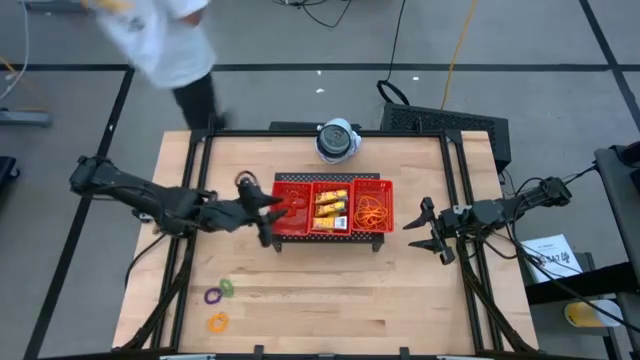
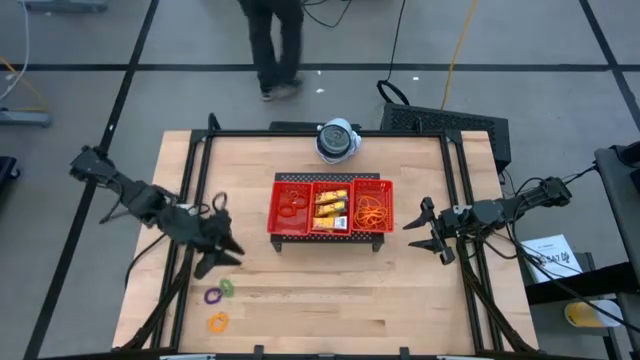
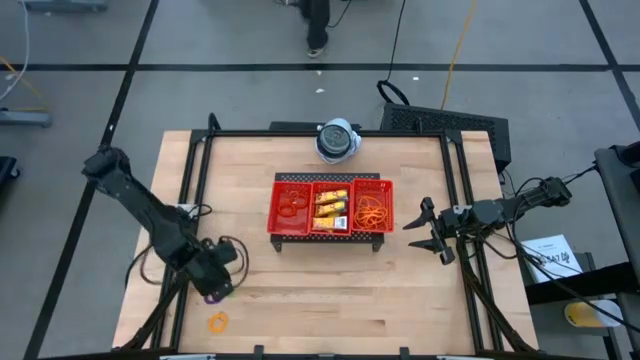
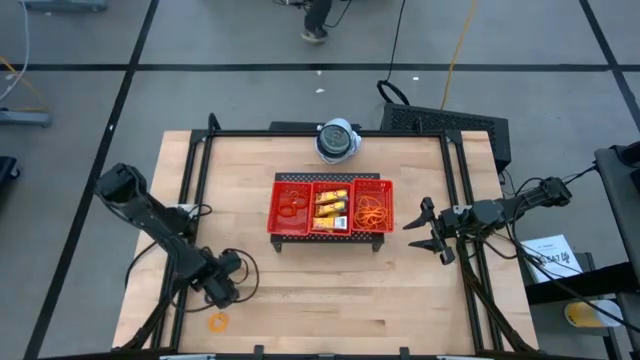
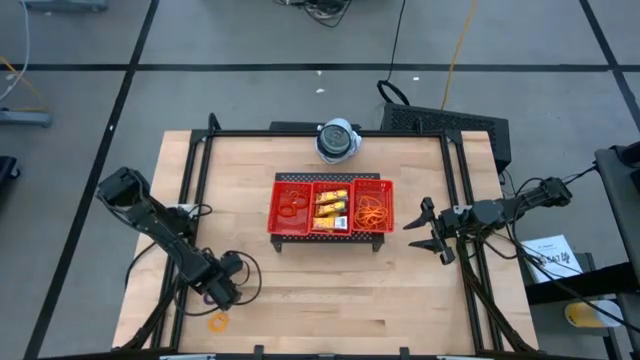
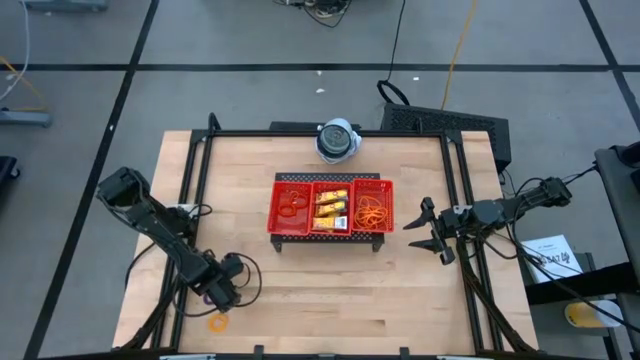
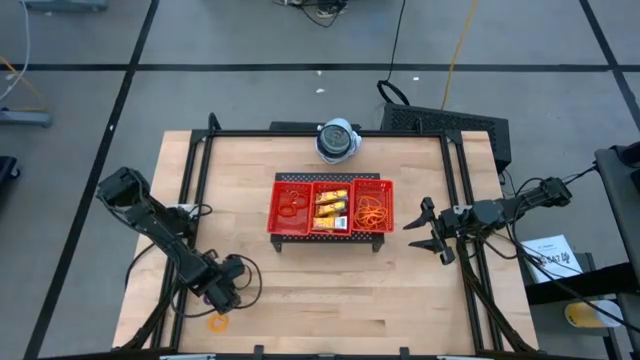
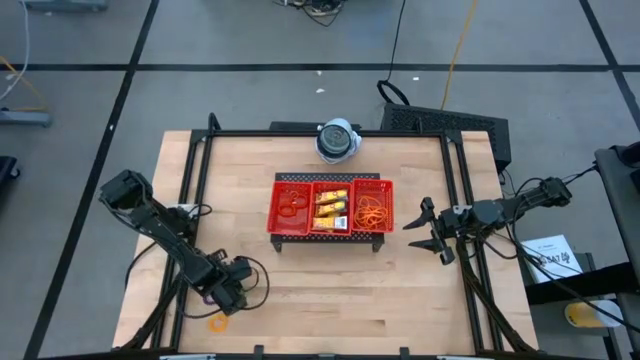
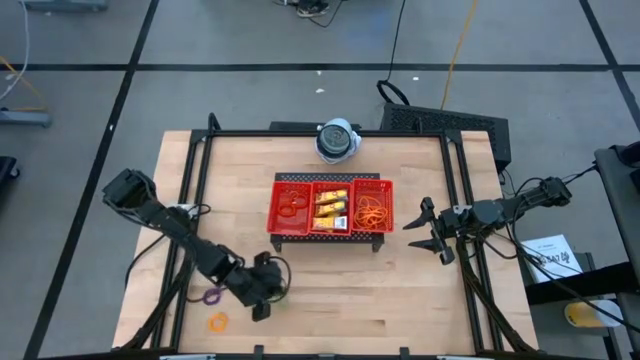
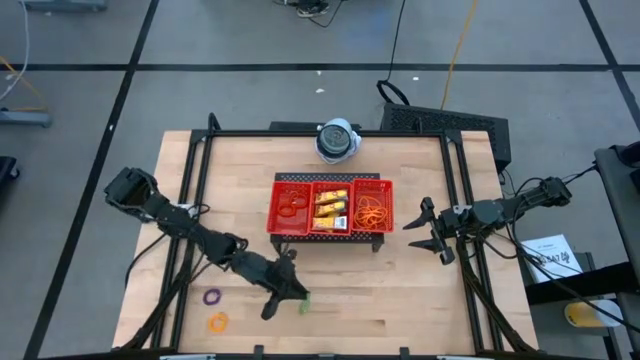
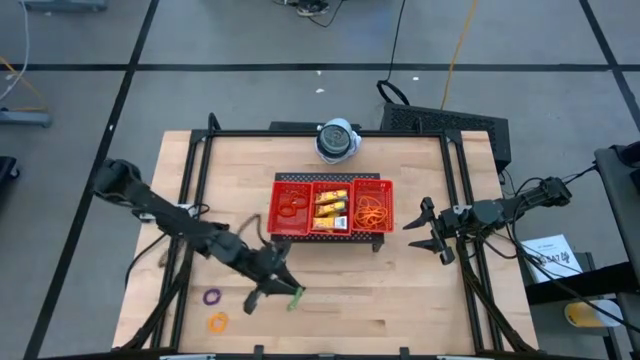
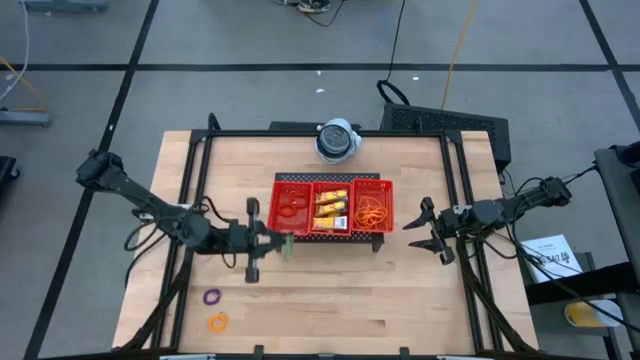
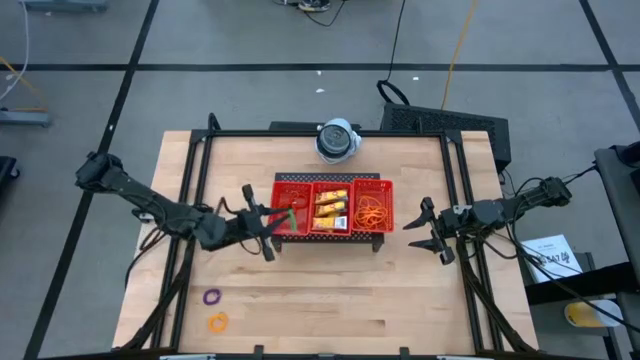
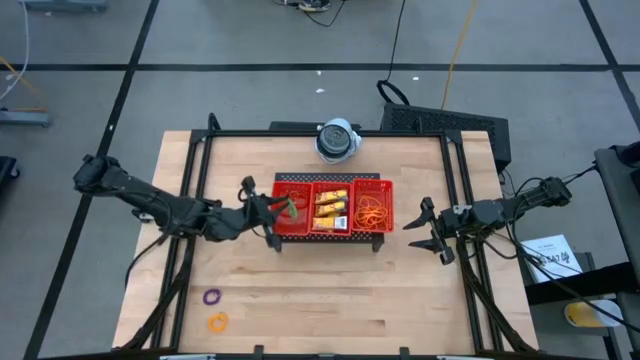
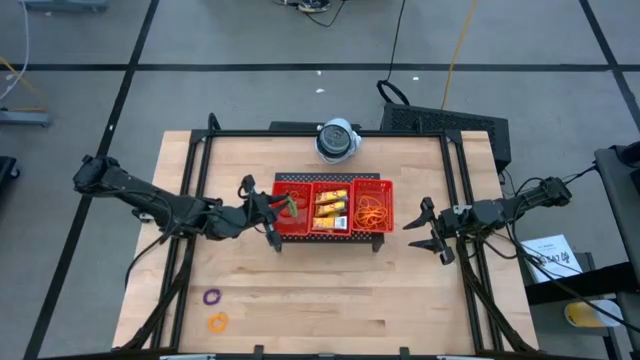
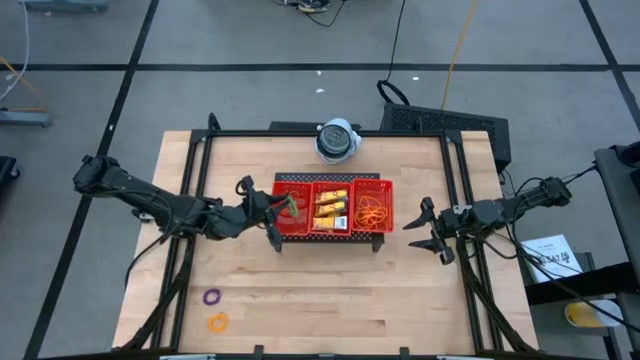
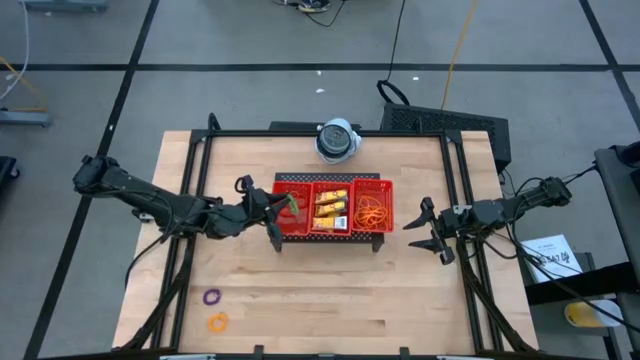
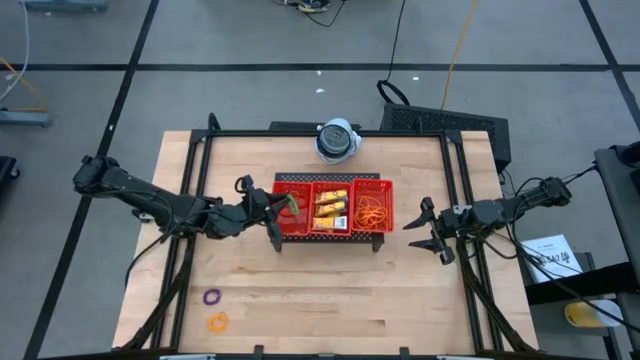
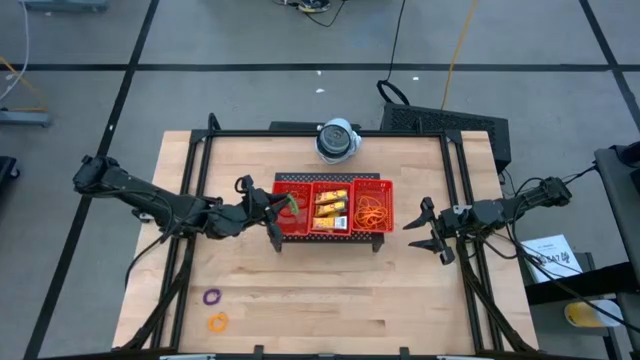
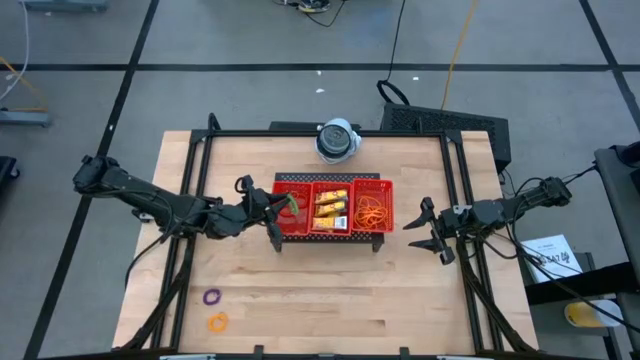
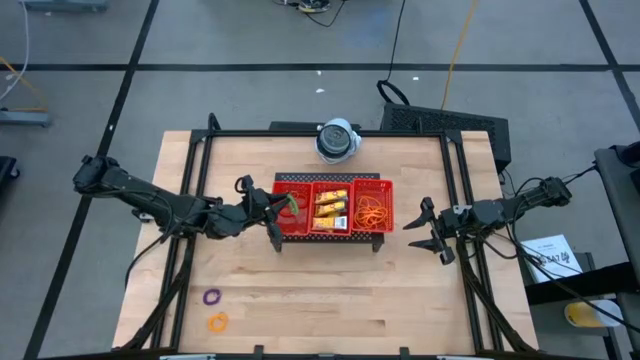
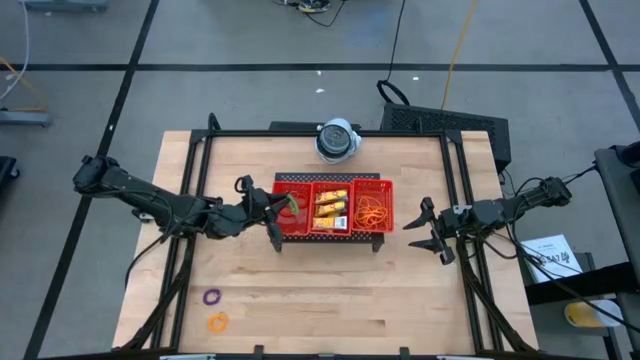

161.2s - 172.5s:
Task: Pick & Place Office Desk Supplies
Put the green spring keychain into the left red bin

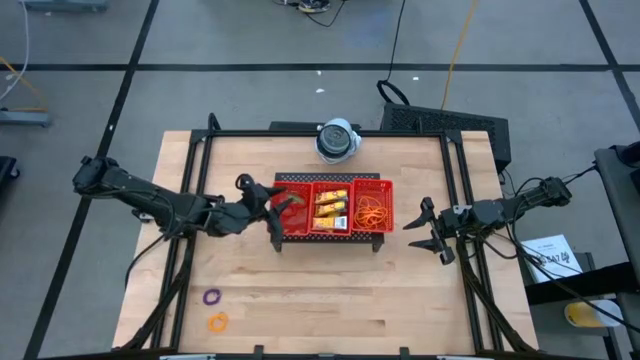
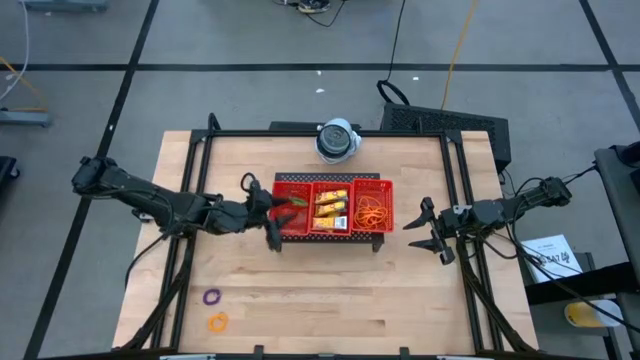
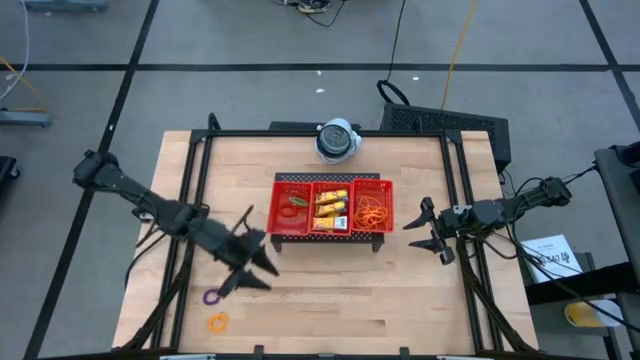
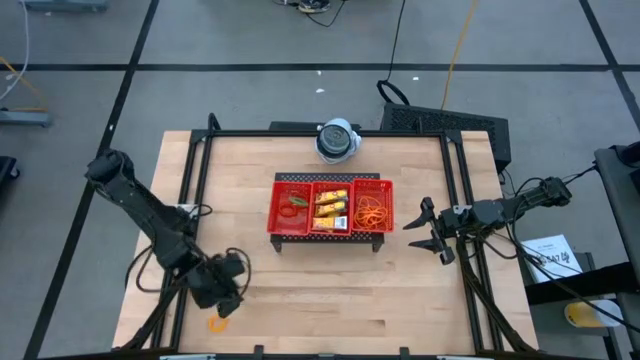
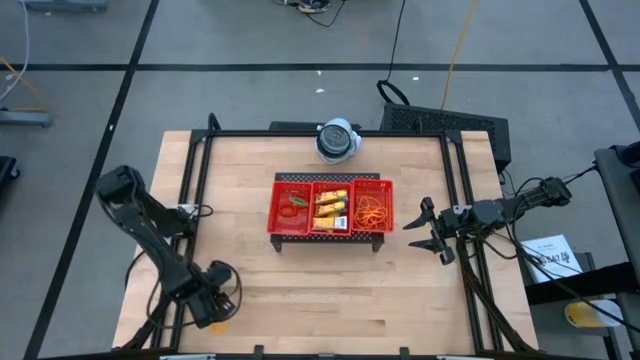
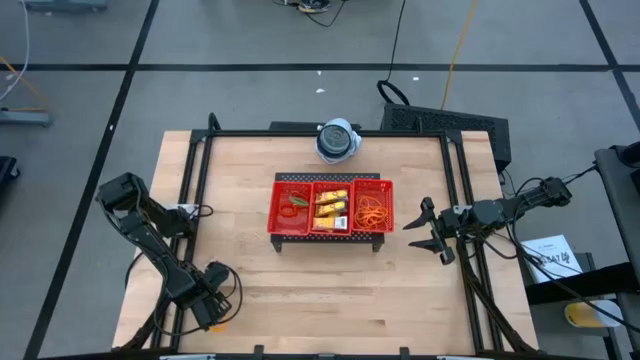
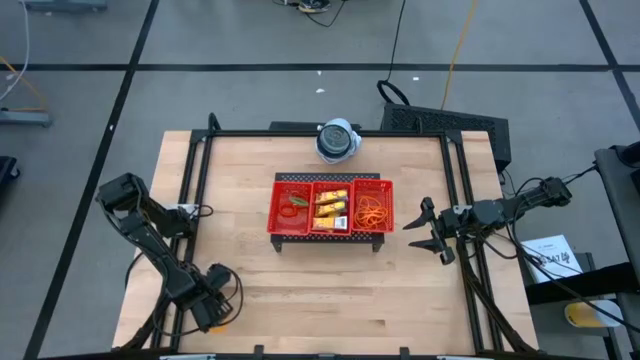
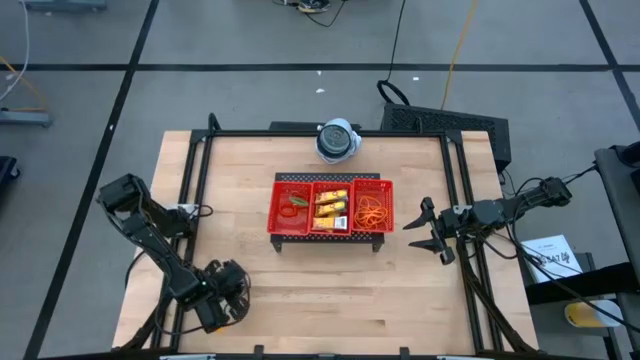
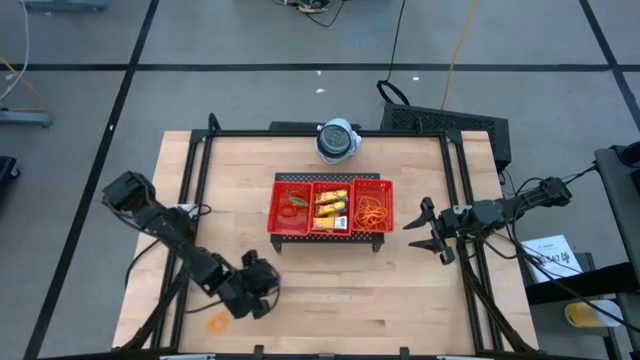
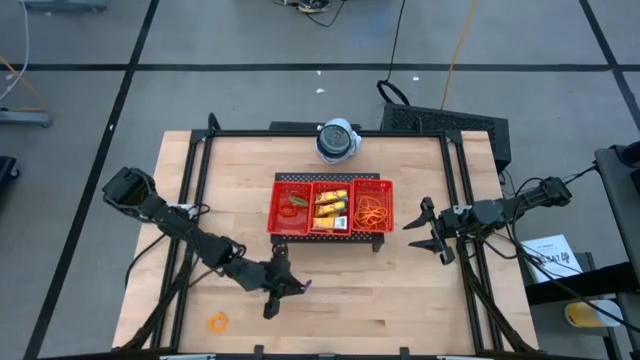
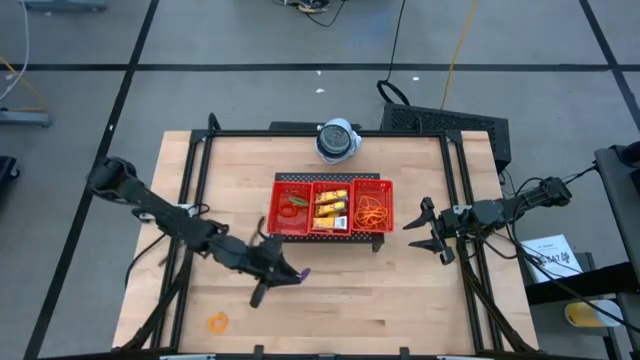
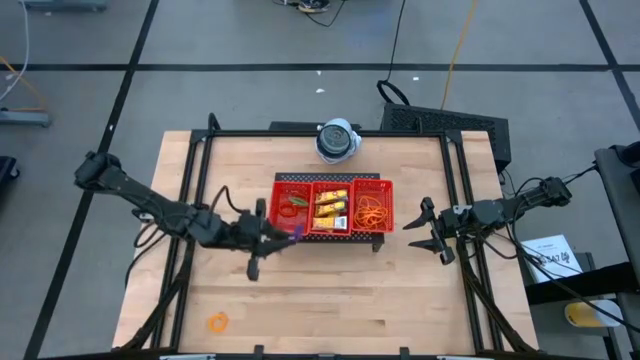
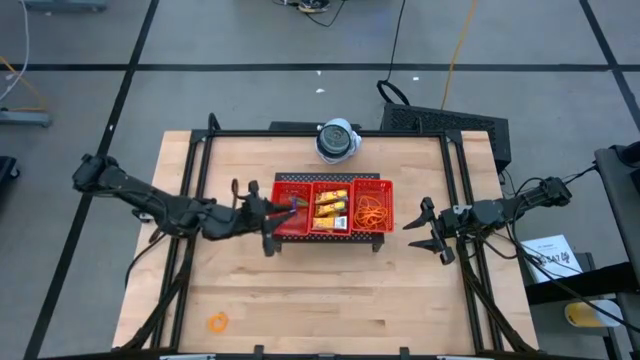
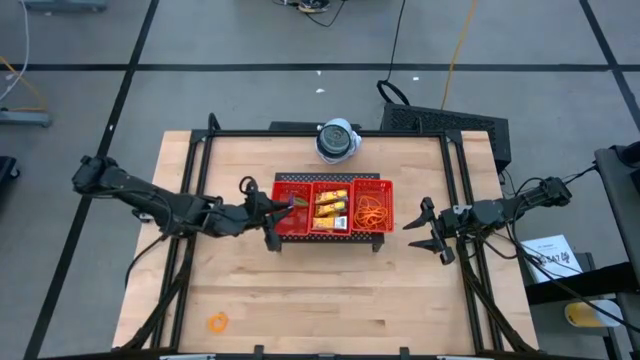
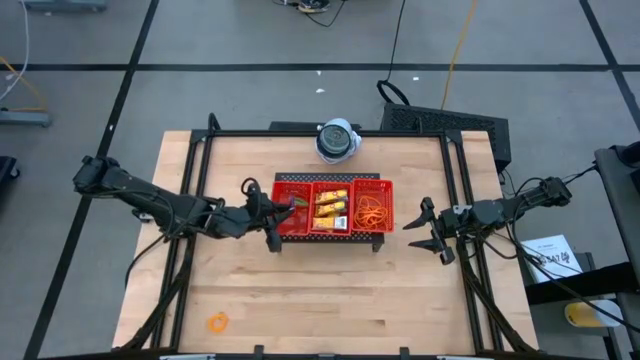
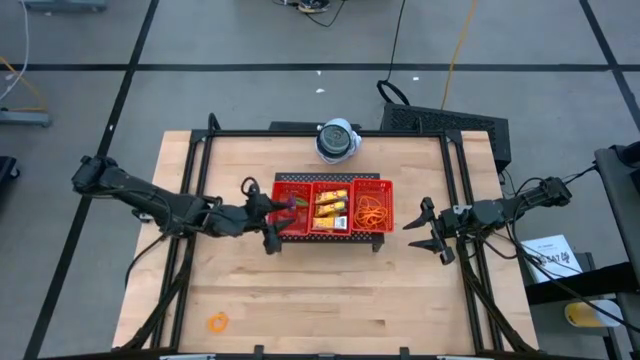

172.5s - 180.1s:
Put the violet spring keychain into the left red bin

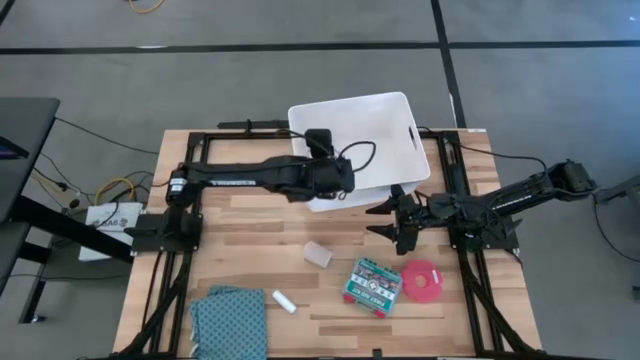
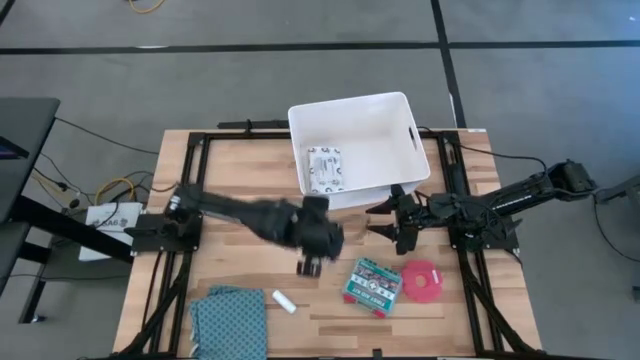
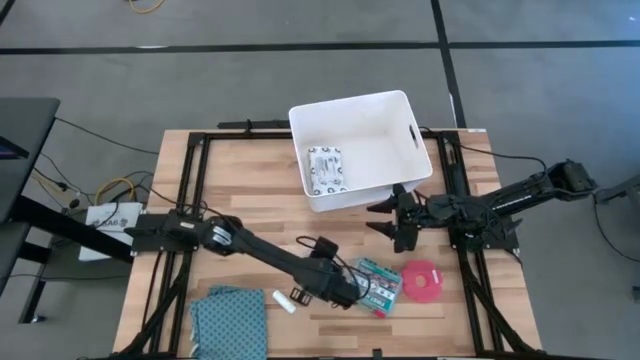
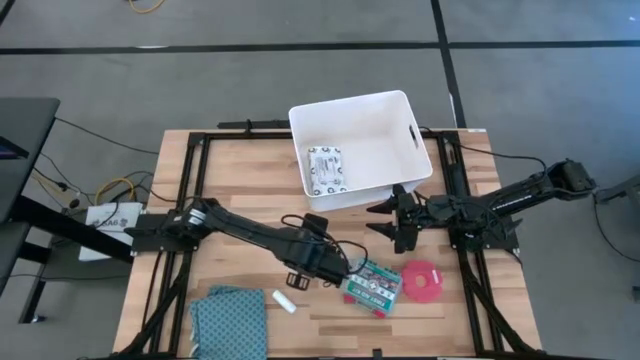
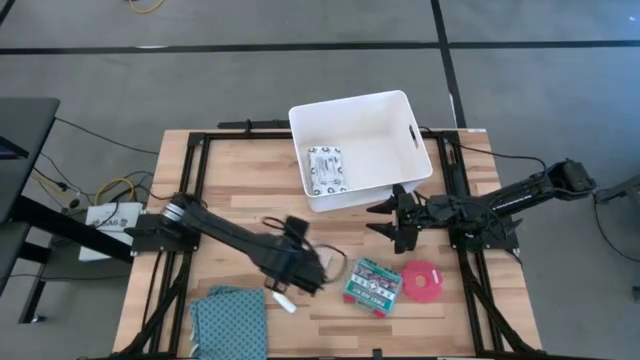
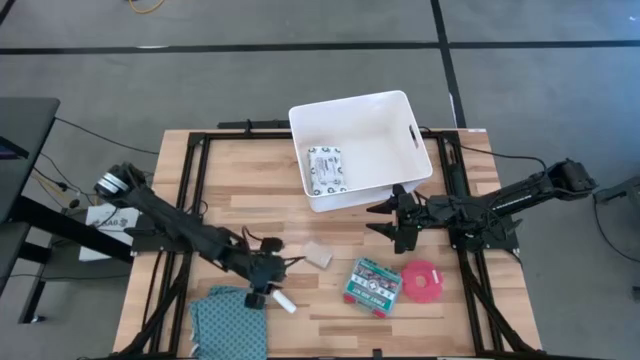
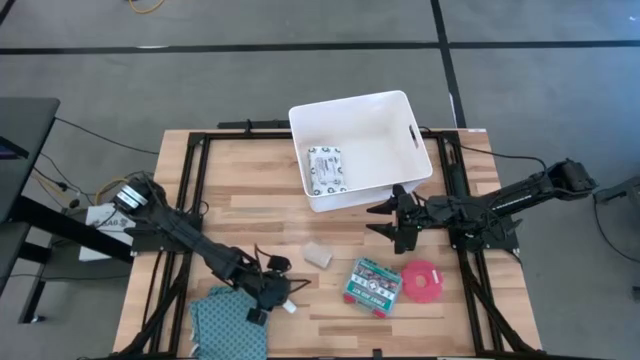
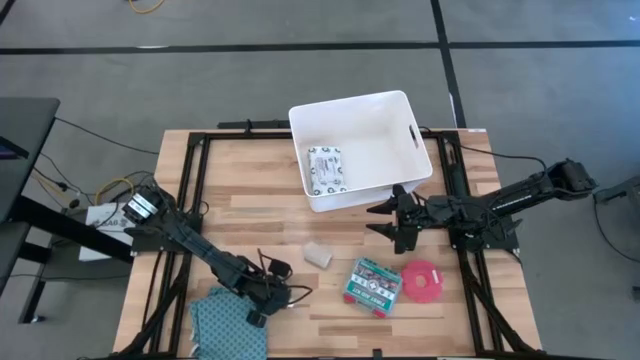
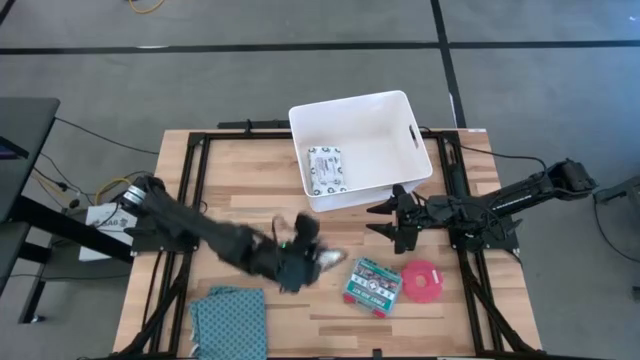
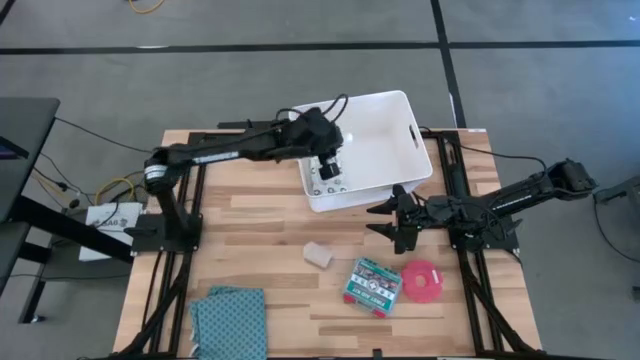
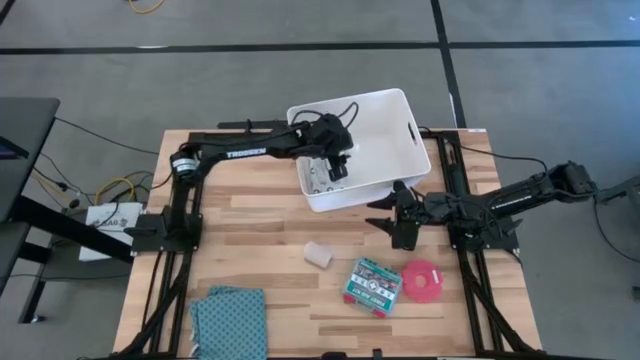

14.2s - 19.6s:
Task: Pick & place medical supplies in basket/bin
Put the white gauze into the white bin
